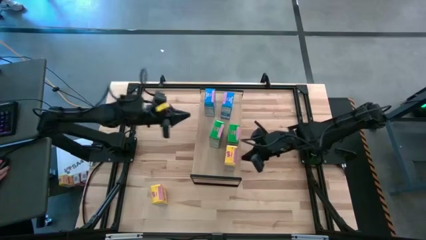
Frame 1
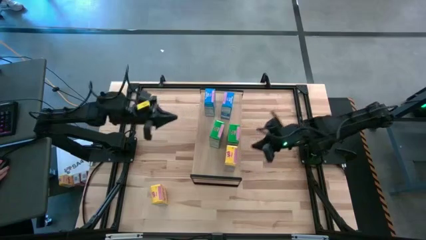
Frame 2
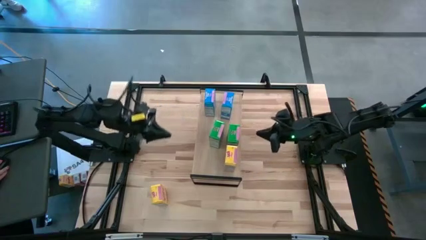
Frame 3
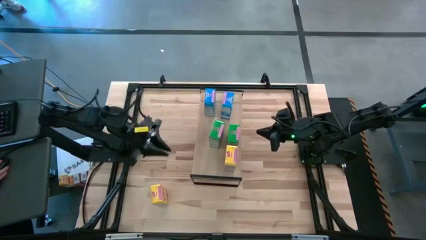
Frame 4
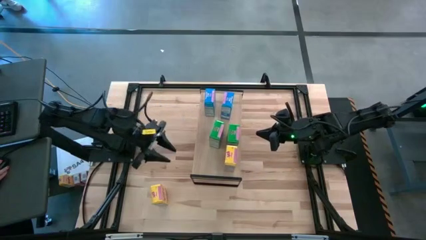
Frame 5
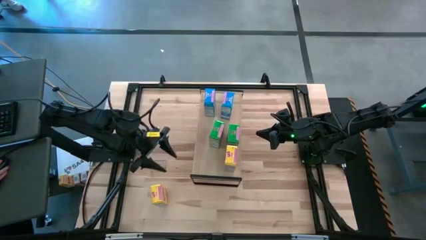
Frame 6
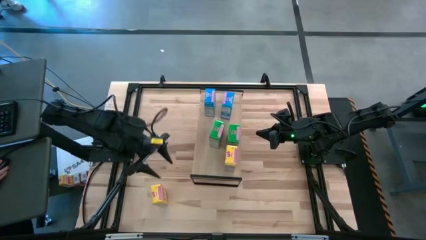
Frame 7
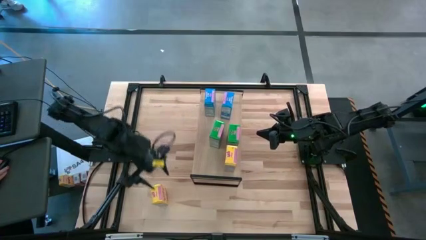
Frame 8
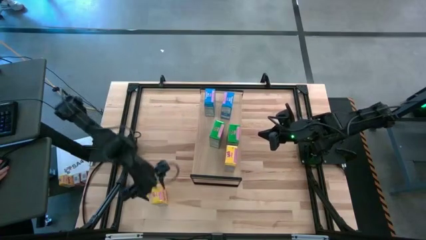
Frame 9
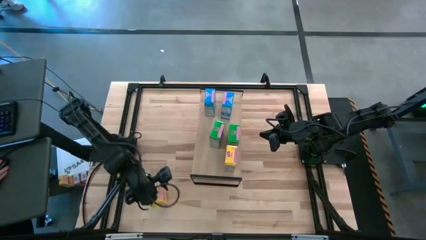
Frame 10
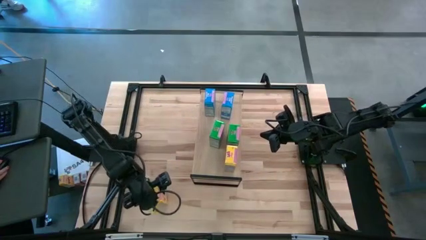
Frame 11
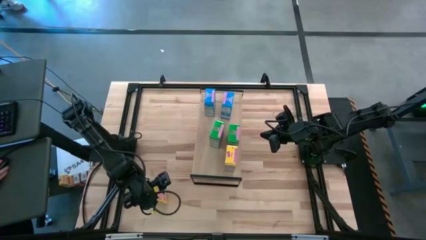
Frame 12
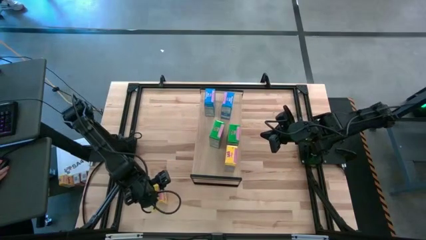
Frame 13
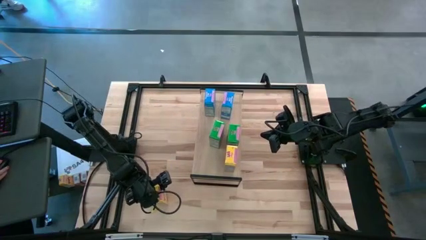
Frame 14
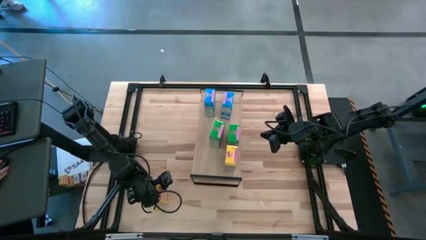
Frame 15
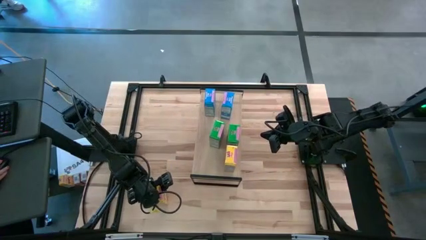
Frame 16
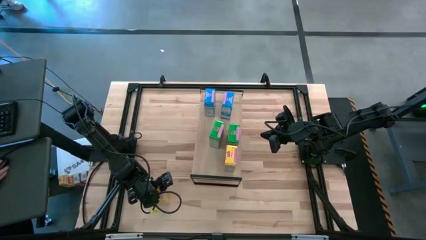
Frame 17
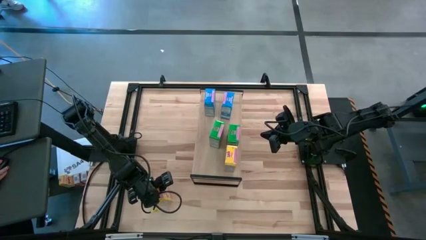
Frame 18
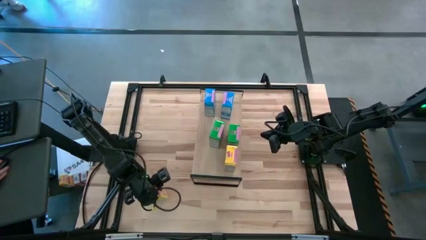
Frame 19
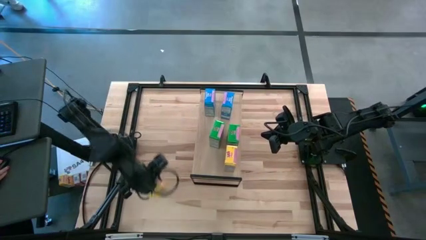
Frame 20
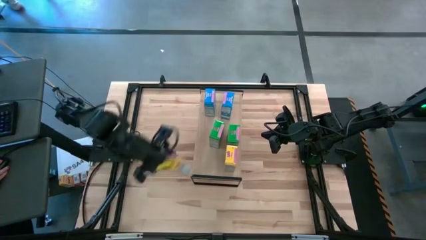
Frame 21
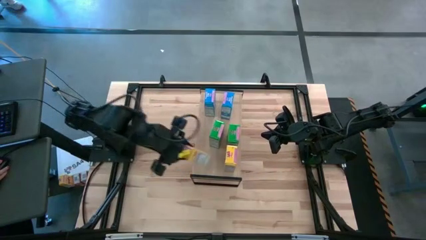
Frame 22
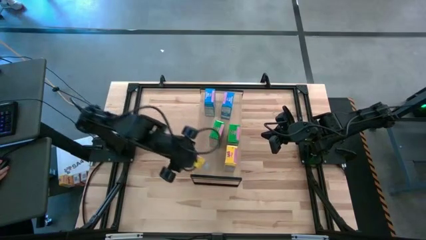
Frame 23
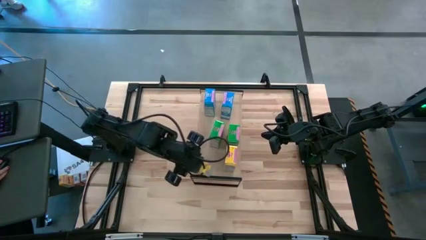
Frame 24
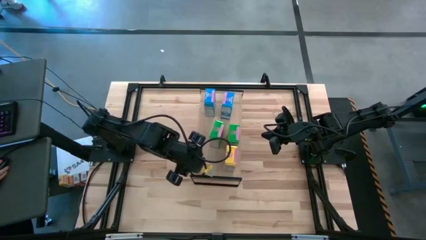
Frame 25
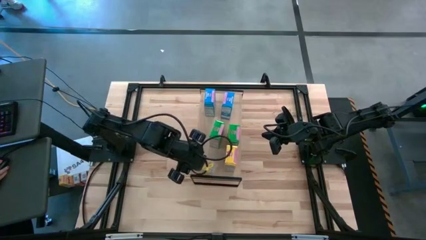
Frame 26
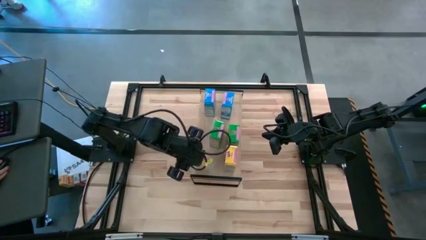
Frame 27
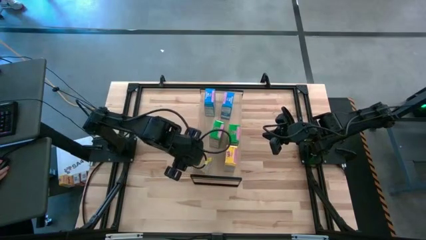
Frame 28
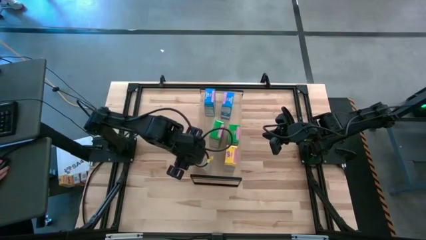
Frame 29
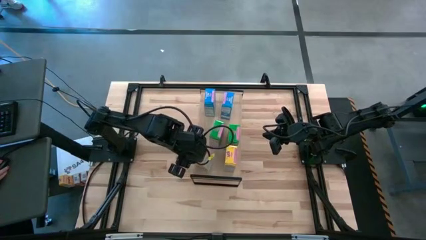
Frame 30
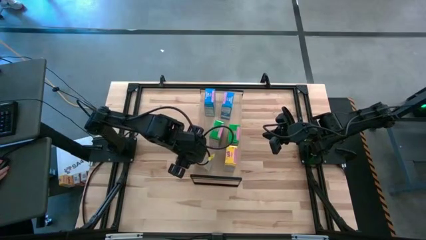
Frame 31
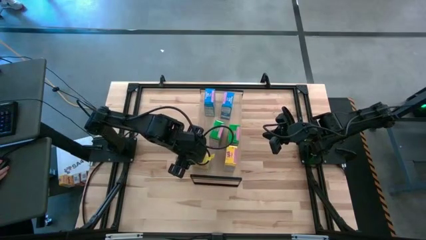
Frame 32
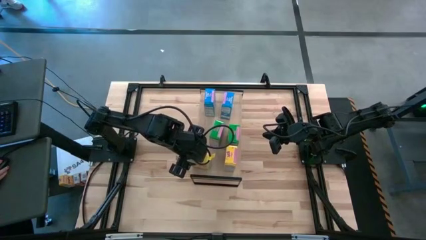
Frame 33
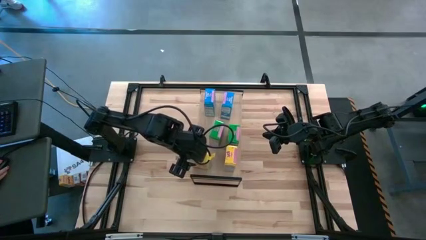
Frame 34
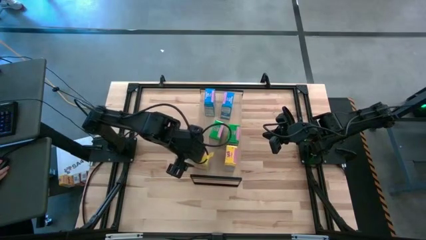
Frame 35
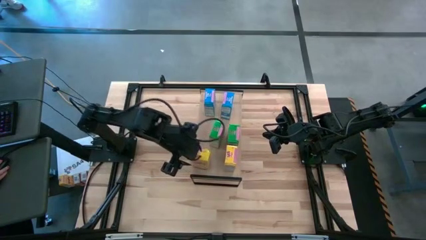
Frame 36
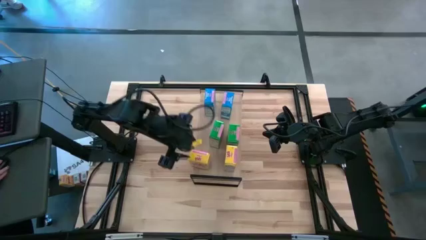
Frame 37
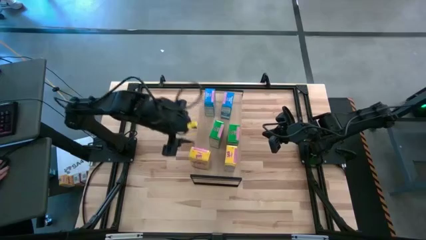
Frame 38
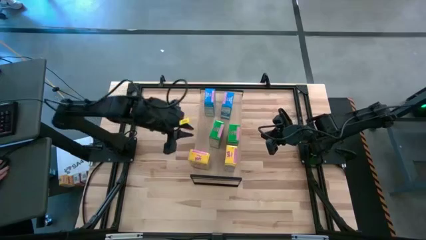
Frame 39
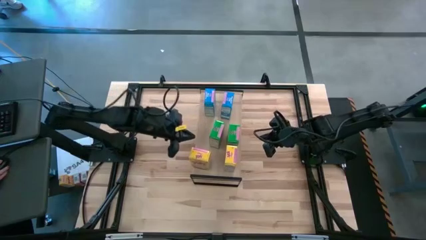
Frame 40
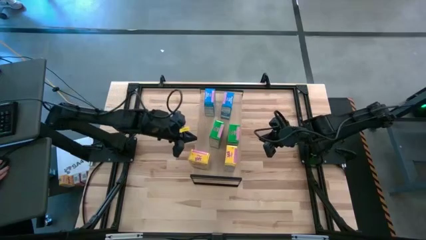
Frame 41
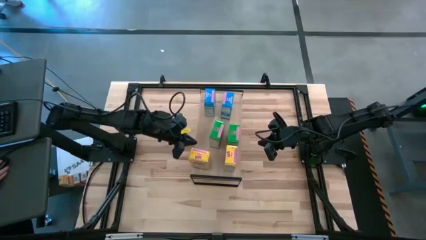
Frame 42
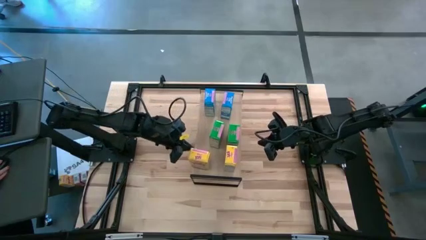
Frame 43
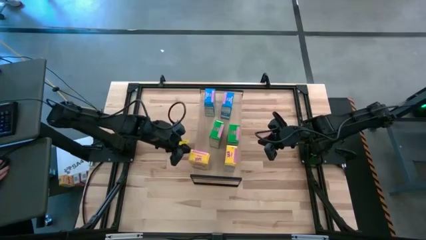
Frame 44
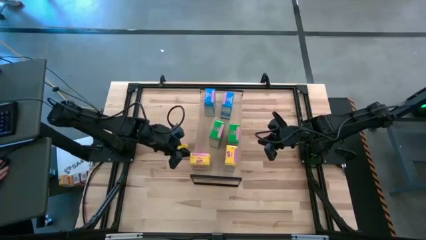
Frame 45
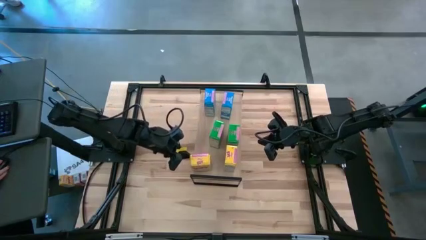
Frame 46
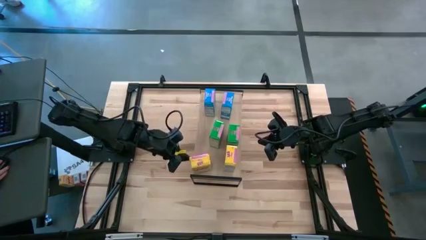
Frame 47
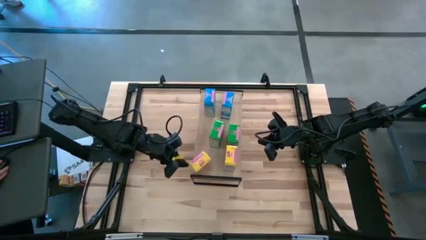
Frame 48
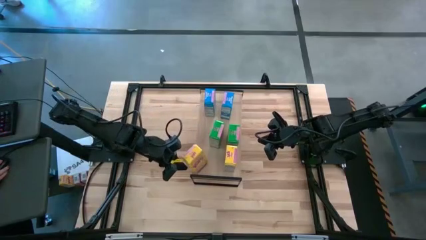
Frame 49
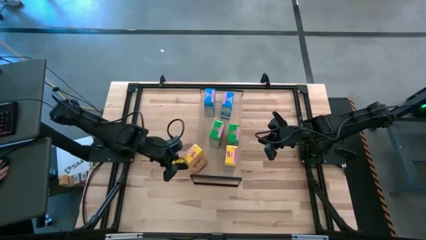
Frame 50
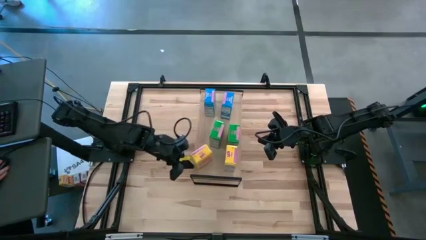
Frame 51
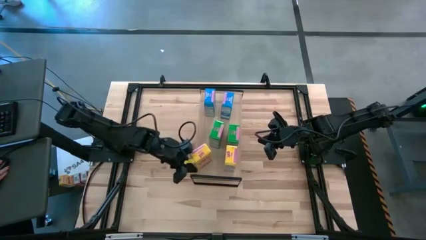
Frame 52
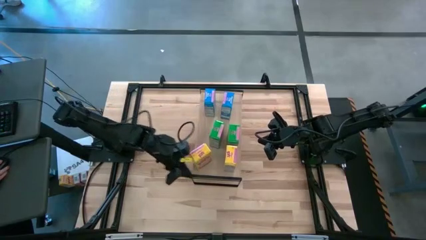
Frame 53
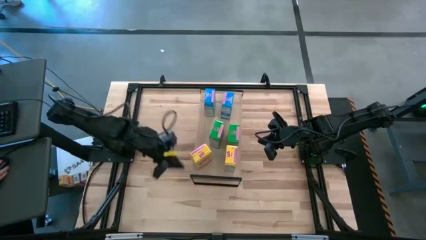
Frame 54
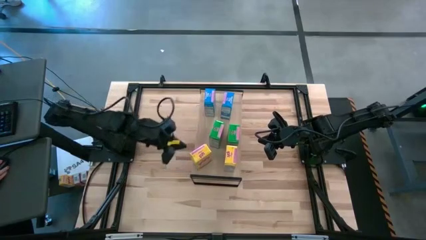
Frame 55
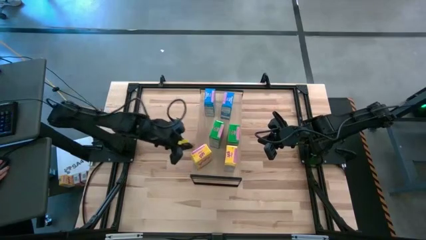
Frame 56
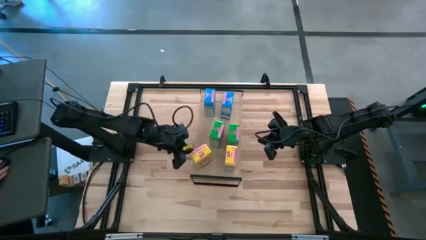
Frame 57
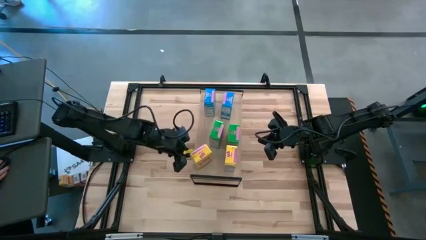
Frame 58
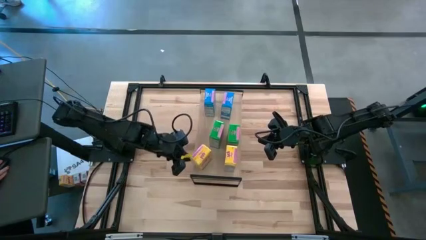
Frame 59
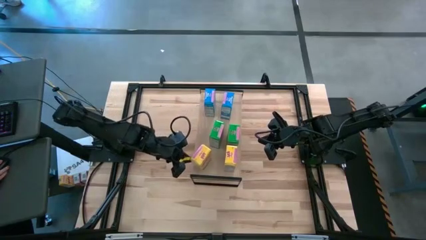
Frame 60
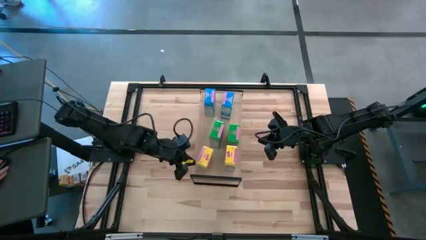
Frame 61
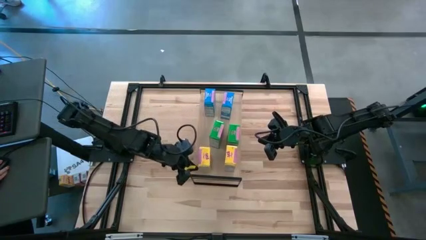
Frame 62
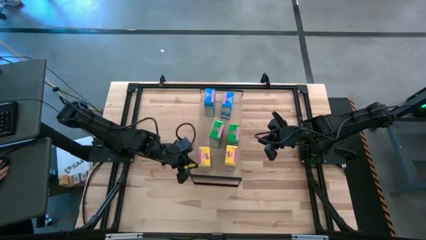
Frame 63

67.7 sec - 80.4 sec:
Task: Stack cereal on shelf
Put the yellow cereal box on the shelf aligned with the other yellow cereal box

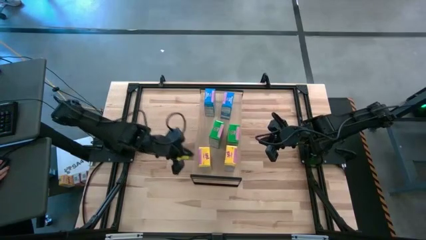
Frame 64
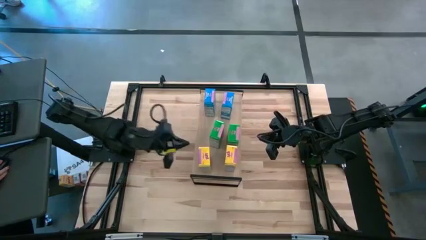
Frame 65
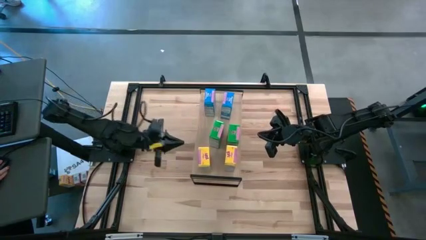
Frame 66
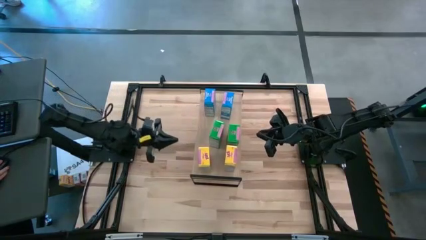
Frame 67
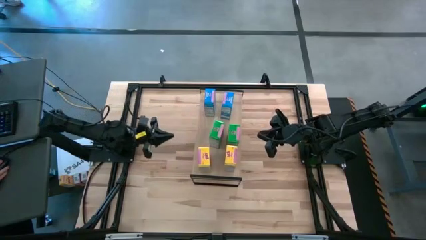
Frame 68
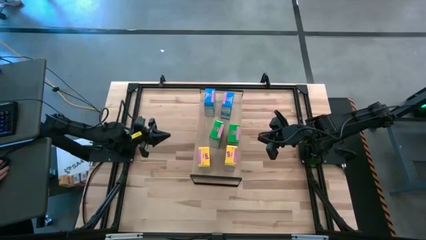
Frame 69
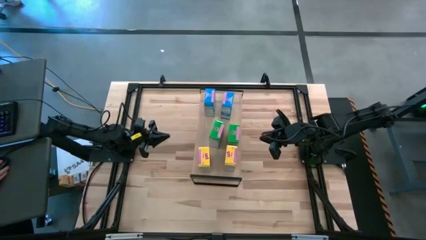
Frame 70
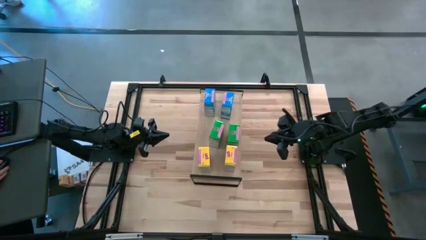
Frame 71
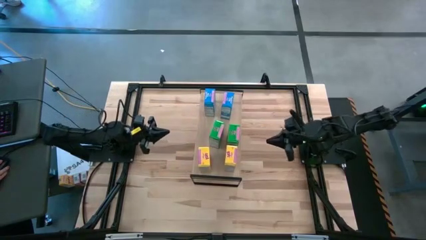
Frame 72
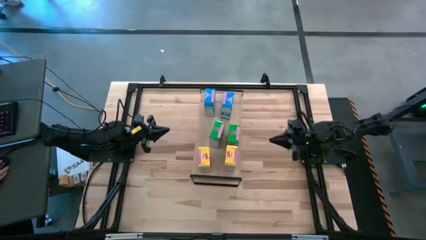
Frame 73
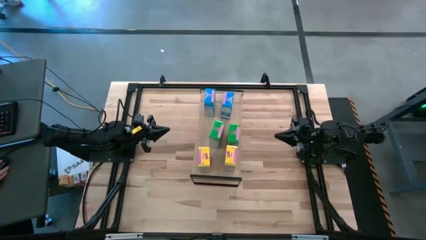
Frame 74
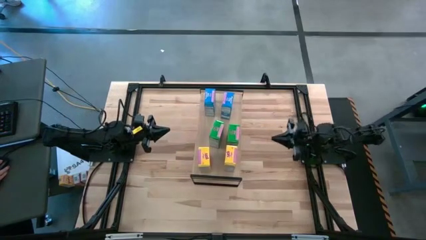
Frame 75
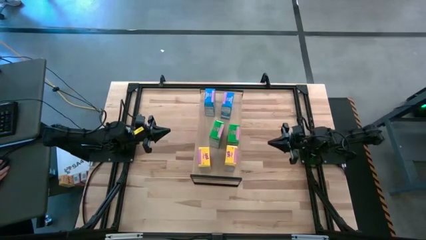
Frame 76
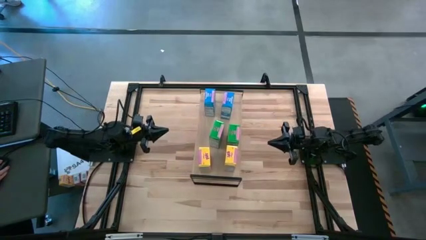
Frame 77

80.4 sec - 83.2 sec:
Return to Home Position

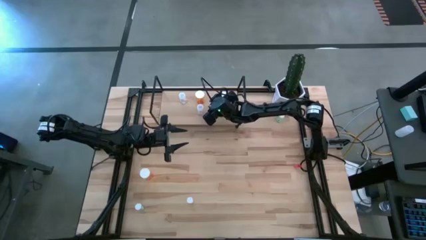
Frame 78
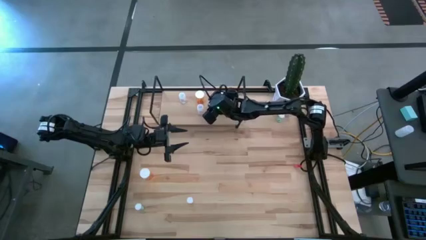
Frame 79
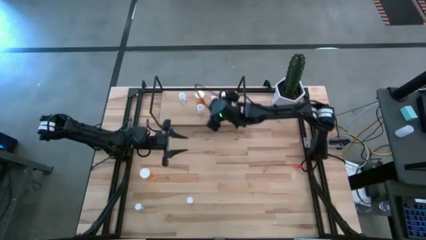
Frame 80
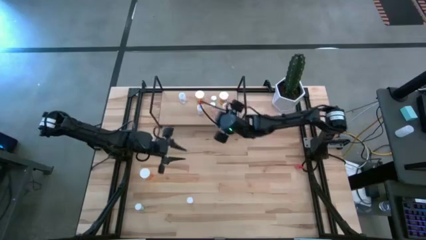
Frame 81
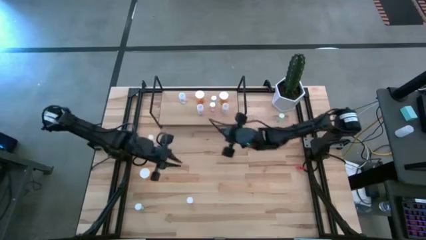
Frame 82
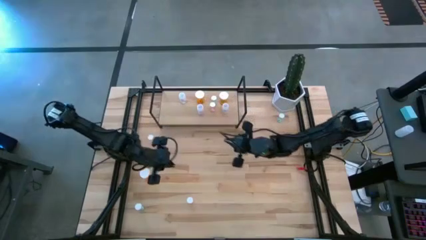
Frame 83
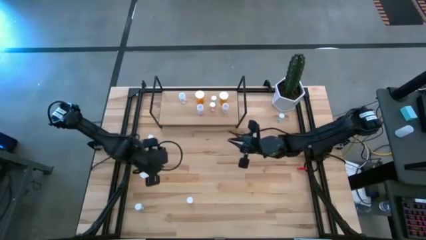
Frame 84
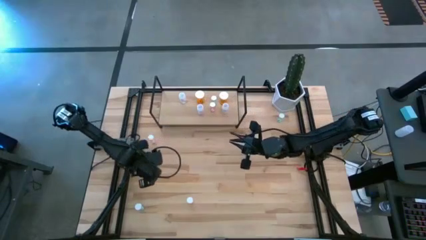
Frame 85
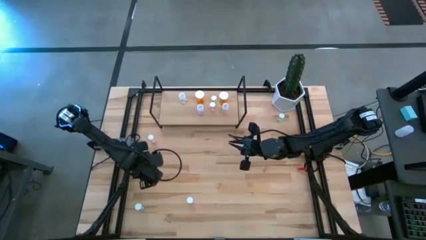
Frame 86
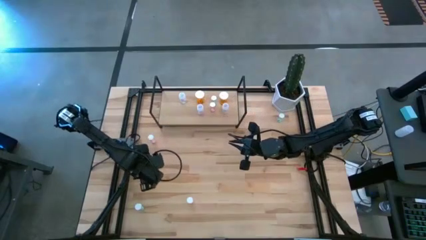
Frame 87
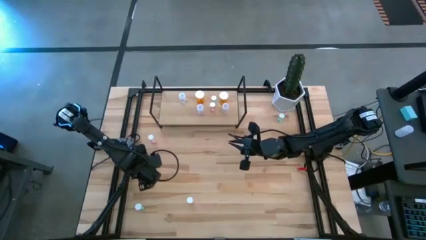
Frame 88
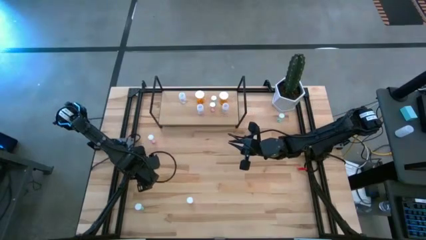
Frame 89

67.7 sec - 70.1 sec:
Task: Pick and place medicine bottles onto shelf by color
Put the orange pill bottle on the shelf
